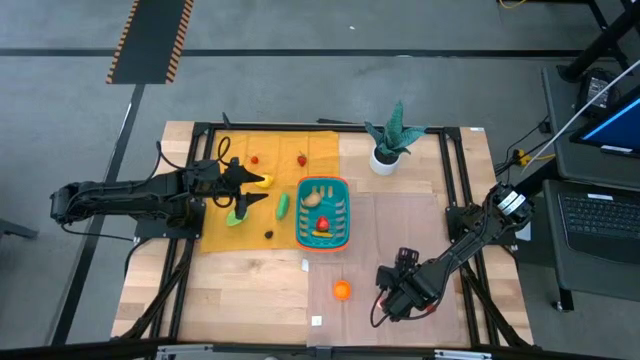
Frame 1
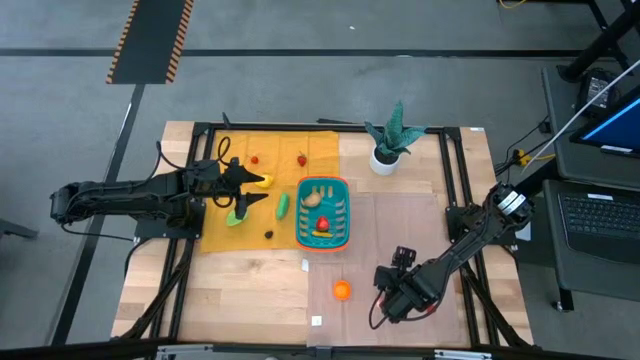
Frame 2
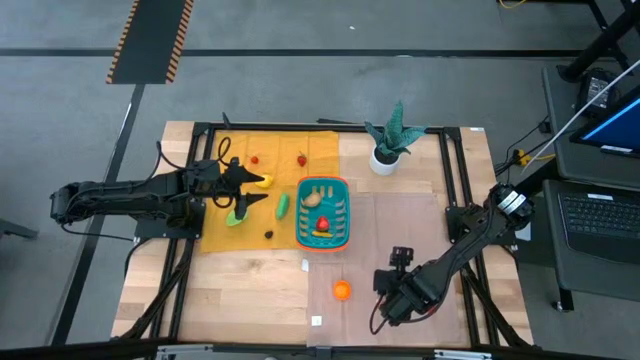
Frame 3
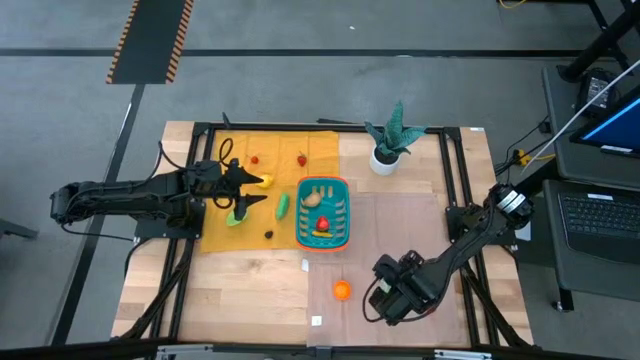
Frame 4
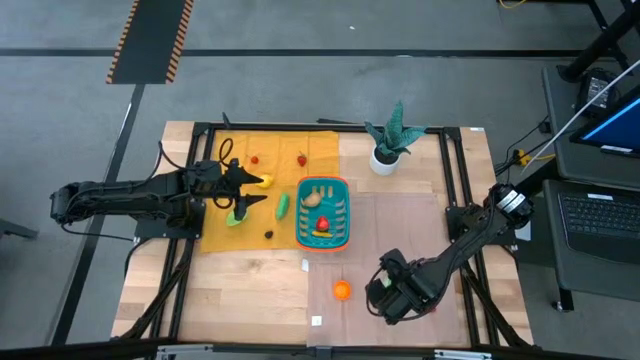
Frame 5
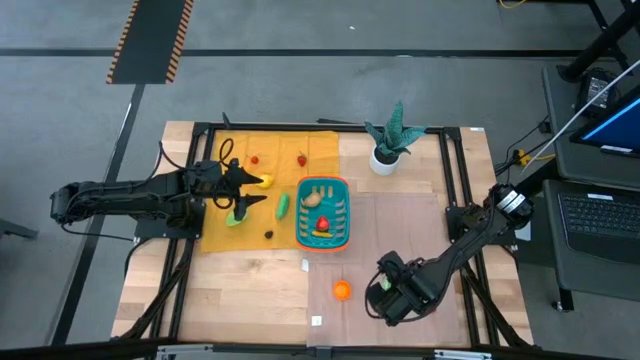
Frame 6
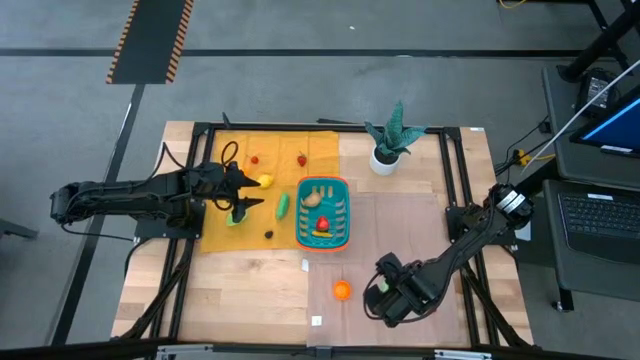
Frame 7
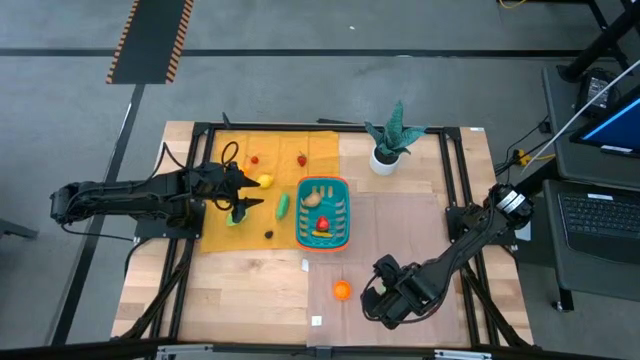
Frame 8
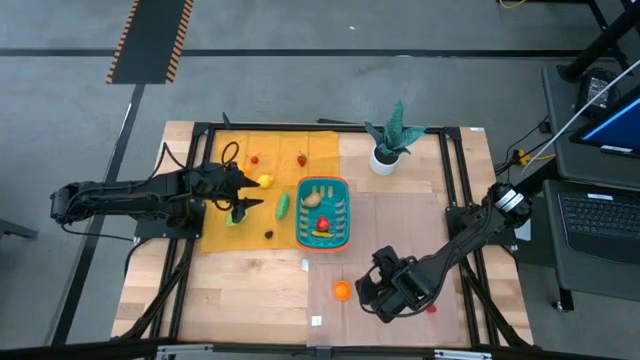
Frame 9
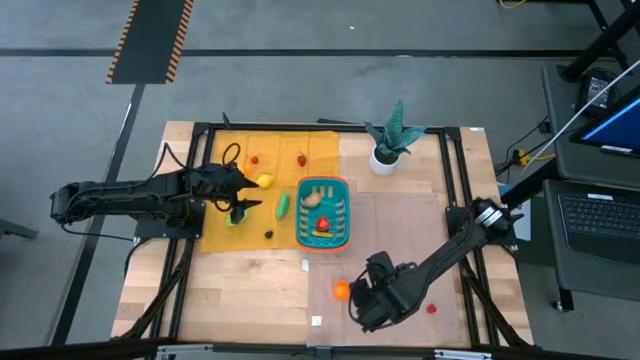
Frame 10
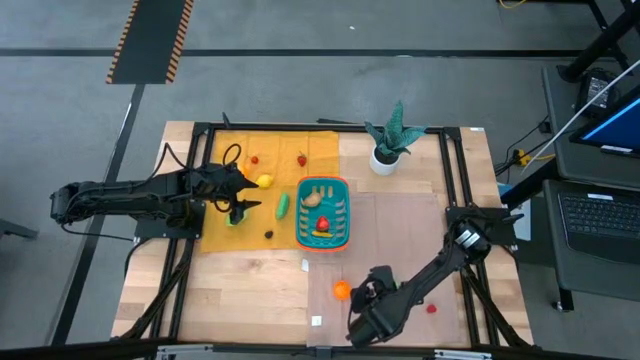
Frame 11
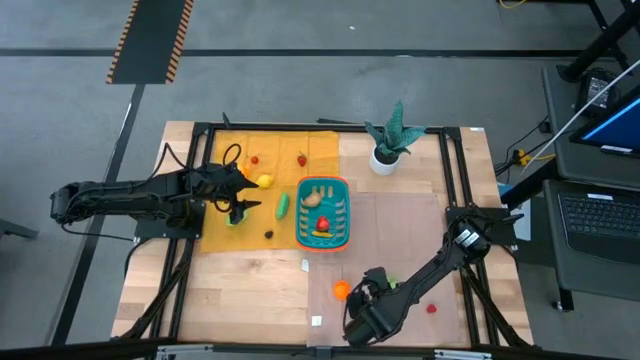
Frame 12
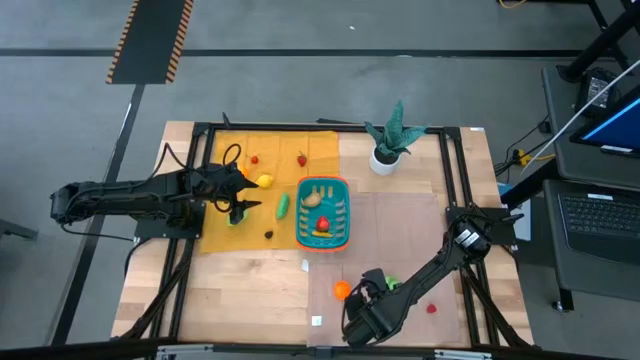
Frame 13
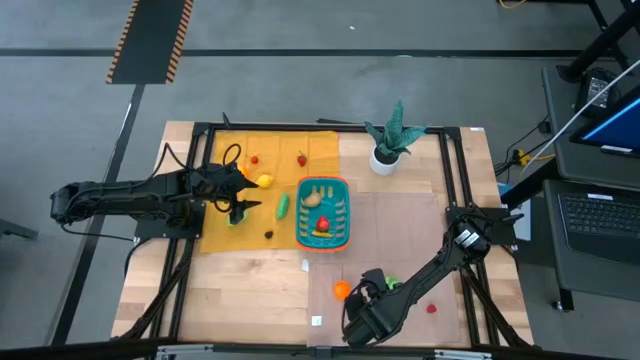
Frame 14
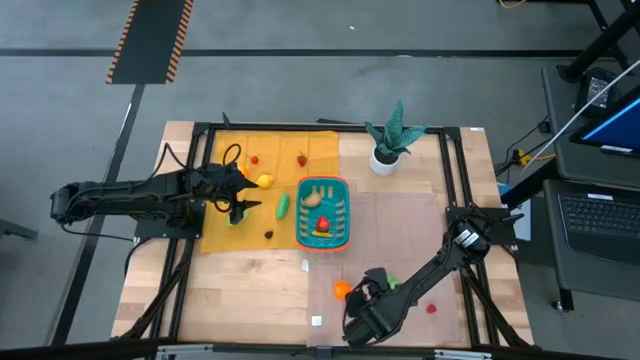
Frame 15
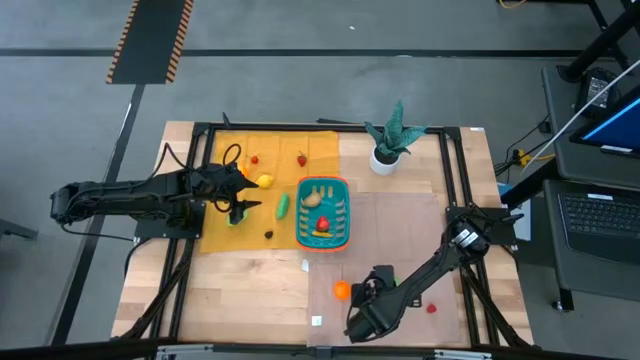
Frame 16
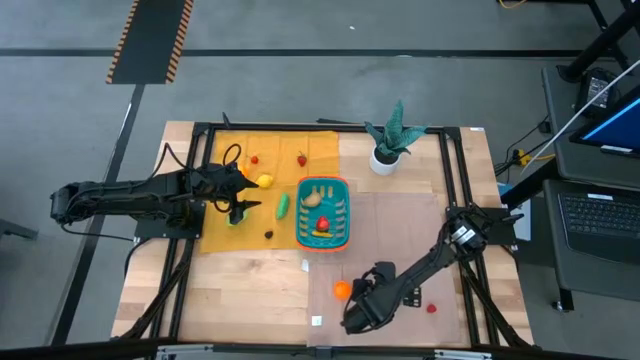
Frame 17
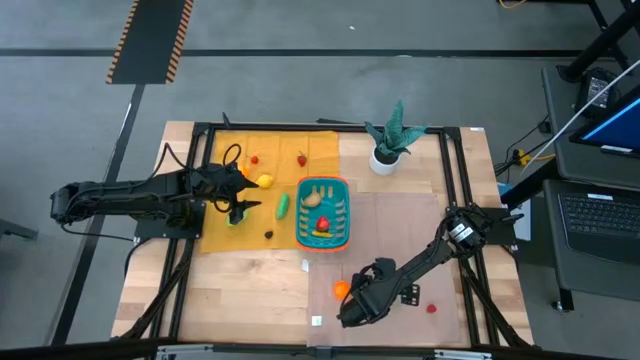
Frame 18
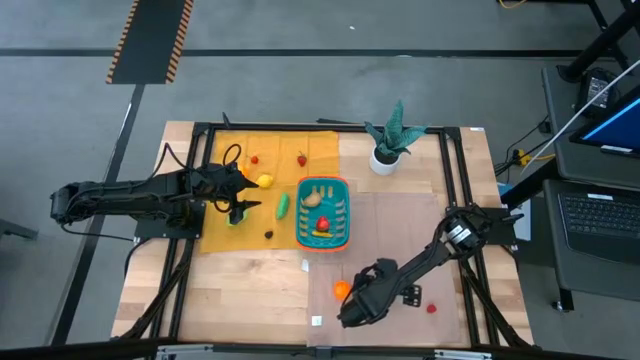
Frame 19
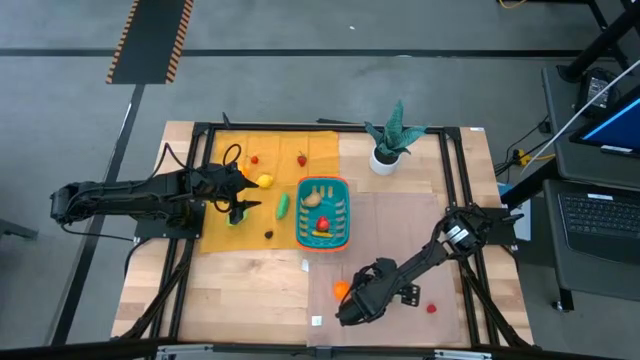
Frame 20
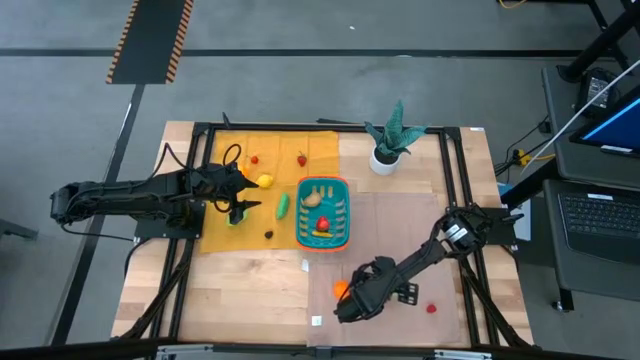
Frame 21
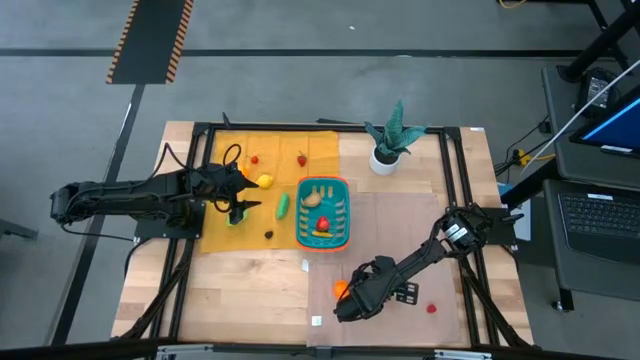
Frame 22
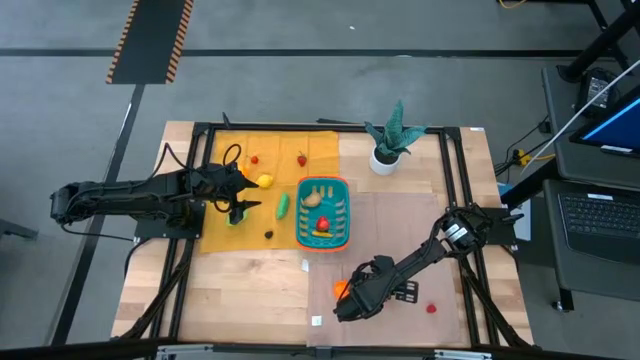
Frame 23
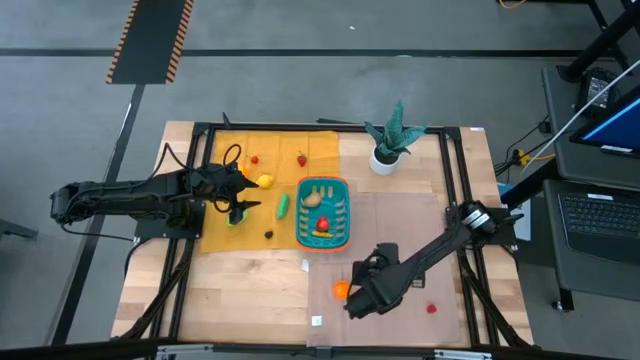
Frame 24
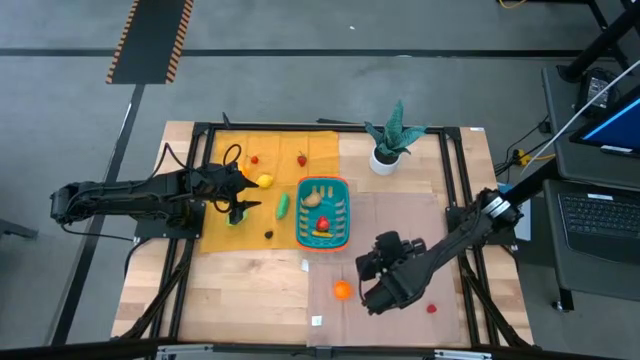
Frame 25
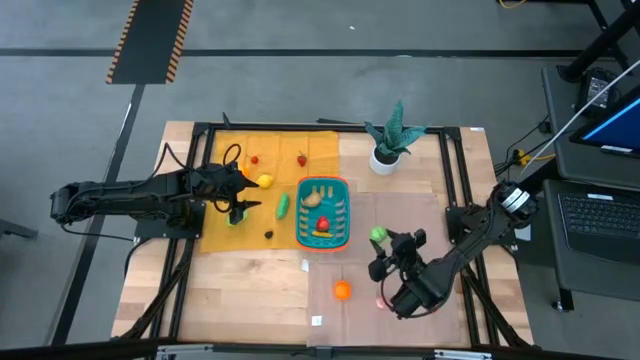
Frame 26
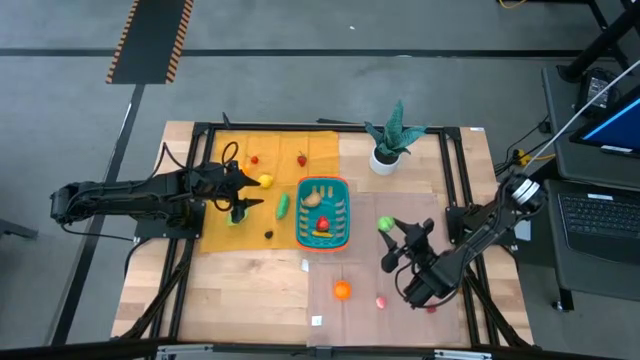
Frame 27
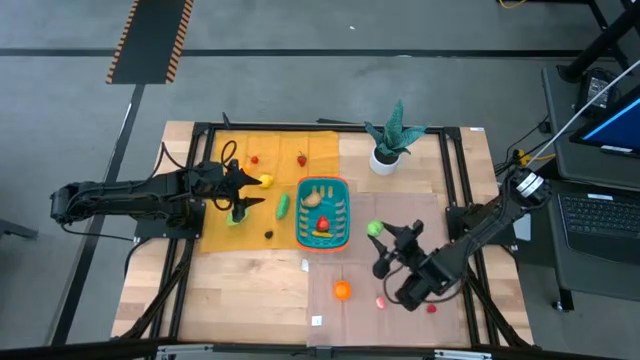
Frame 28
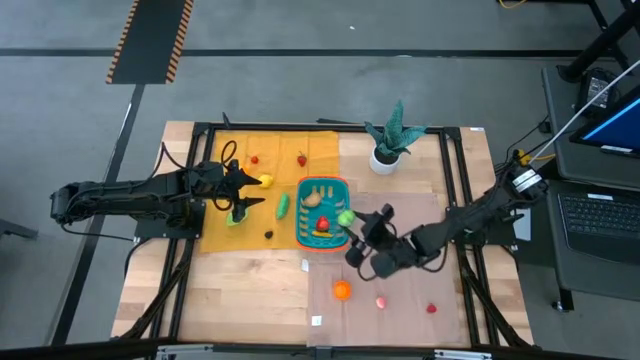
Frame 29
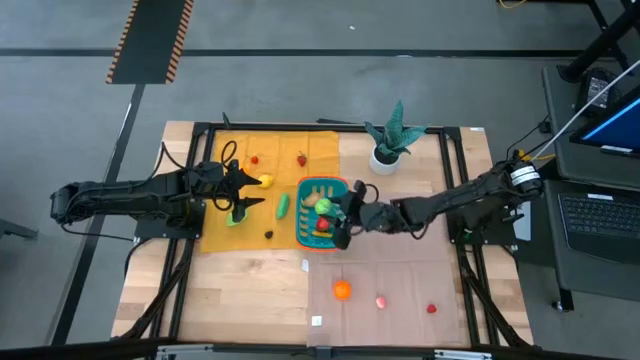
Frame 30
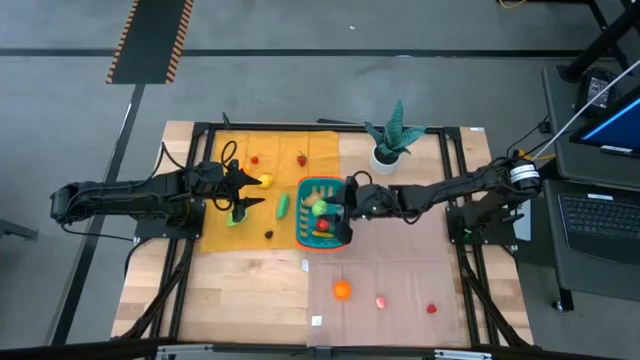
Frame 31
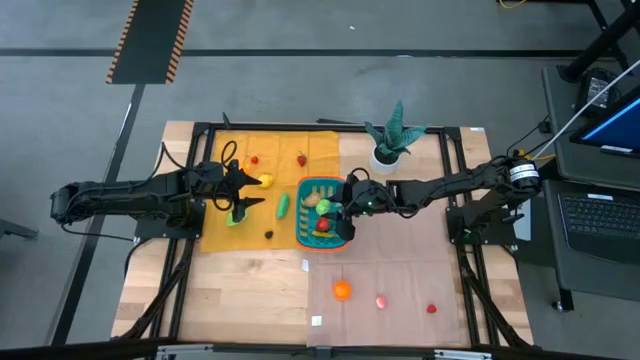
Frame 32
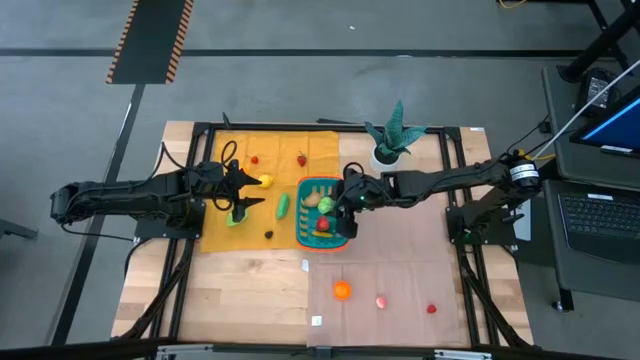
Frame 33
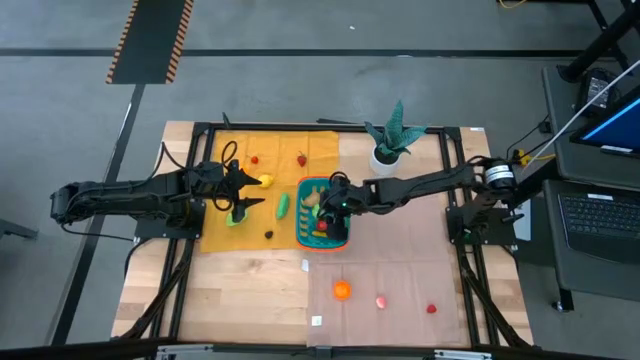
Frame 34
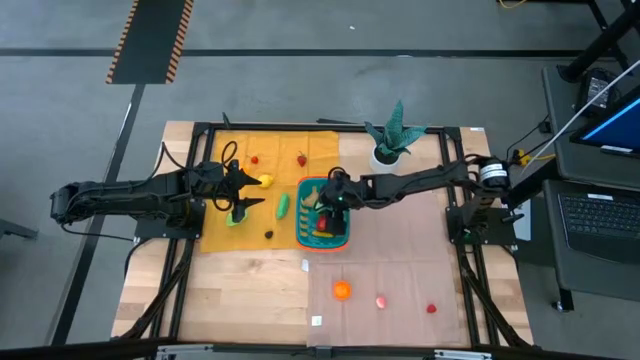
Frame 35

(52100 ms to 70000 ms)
Task: Pick and placing Produce into tupperware
Put the cabbage into the basket

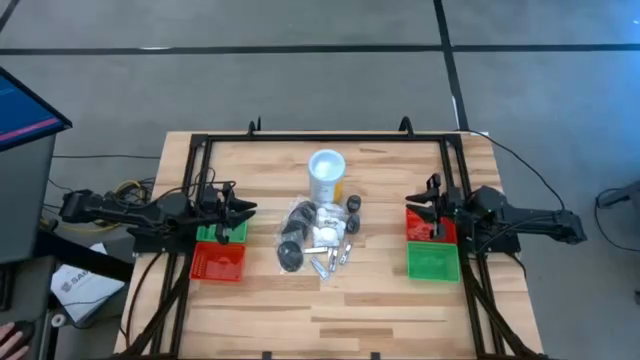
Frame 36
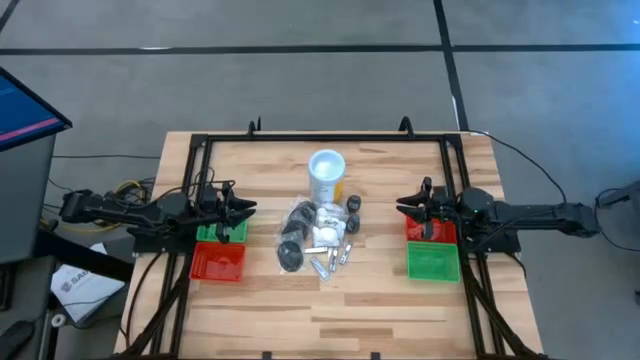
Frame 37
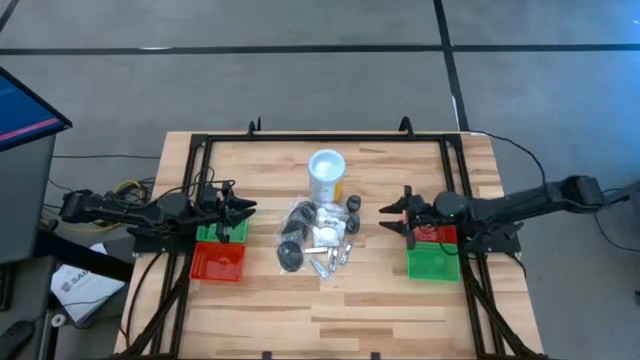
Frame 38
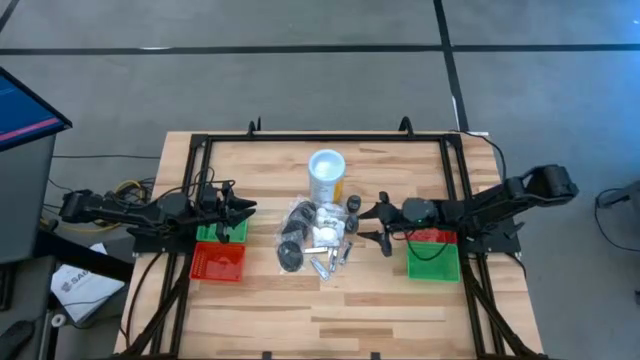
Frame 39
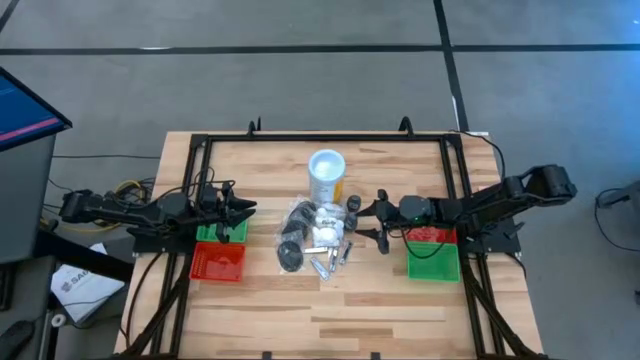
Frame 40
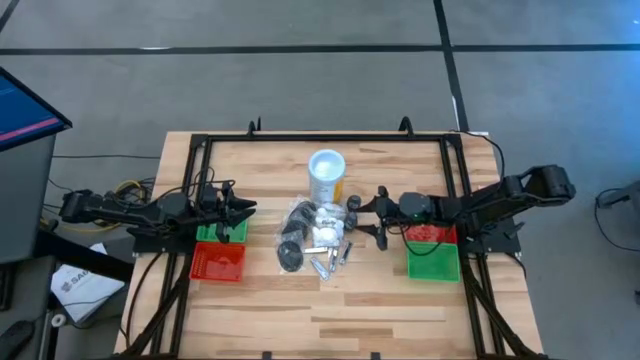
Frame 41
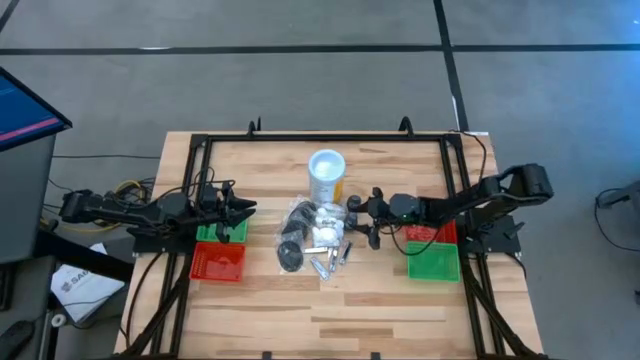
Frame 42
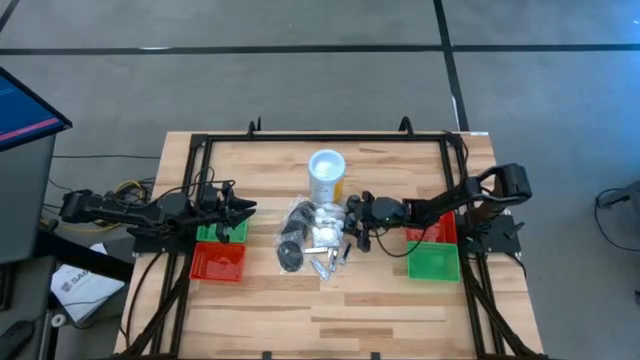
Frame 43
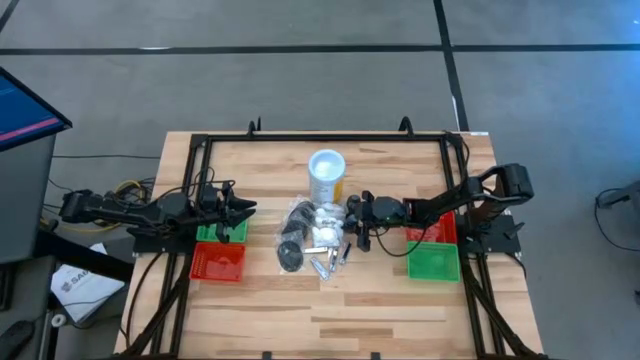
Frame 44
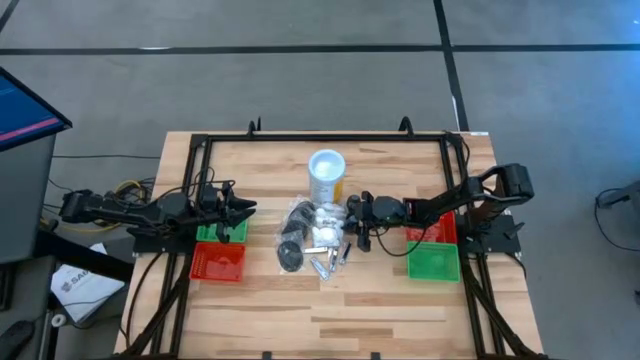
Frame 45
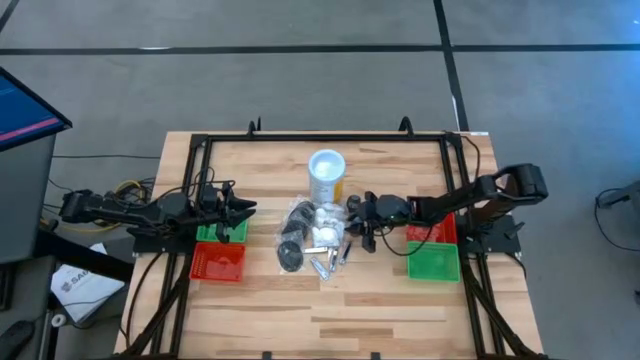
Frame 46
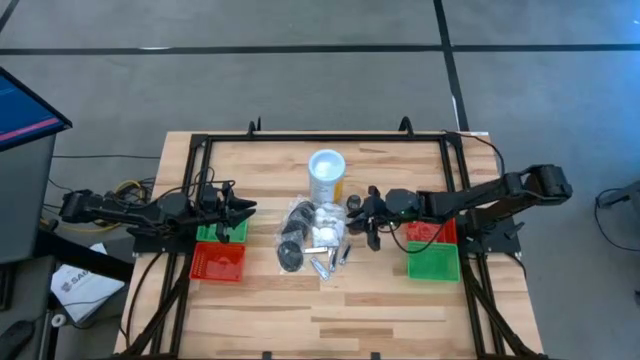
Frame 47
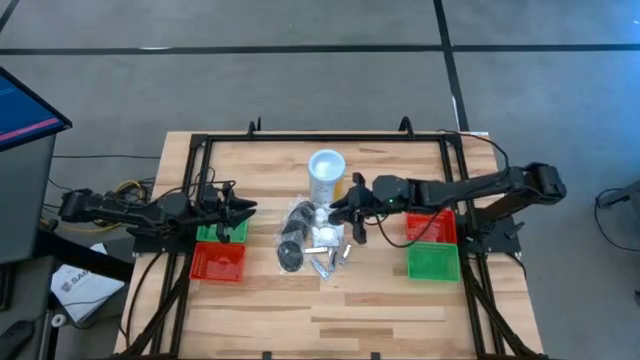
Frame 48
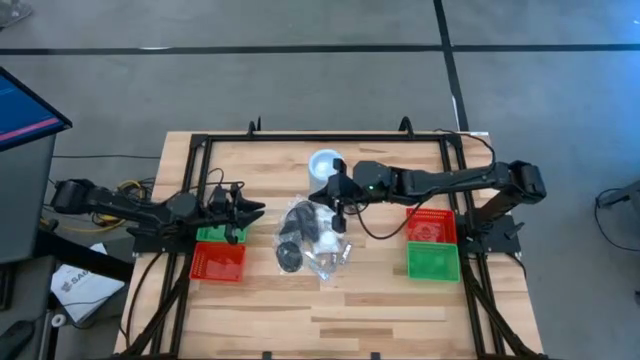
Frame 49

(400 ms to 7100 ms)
Task: Pick & Place Travel size toiletries
Put the gray deodorant into the left green bin
